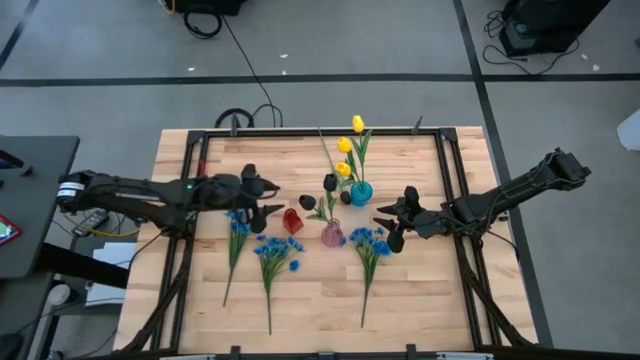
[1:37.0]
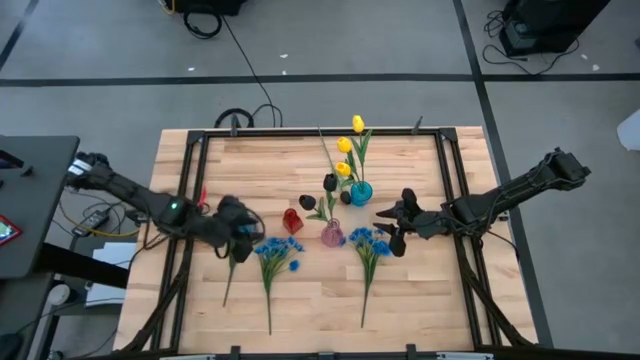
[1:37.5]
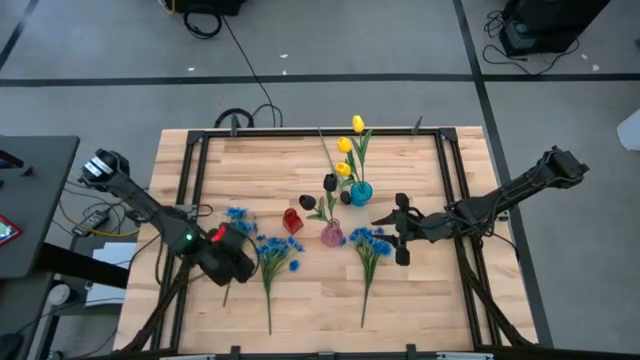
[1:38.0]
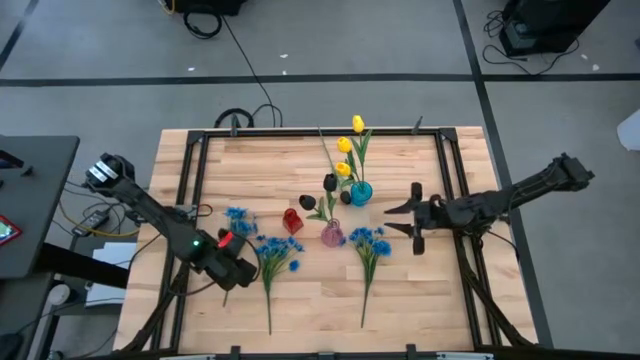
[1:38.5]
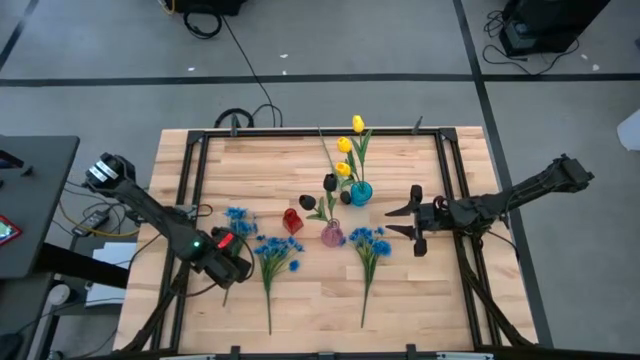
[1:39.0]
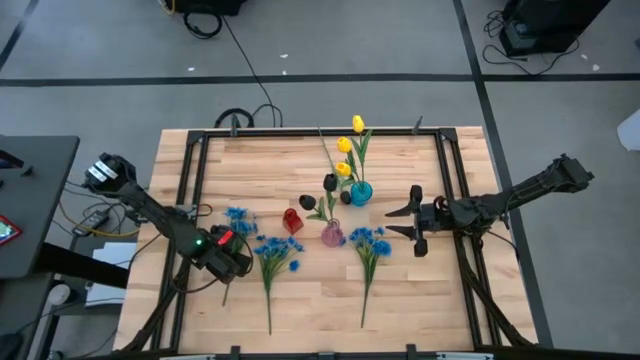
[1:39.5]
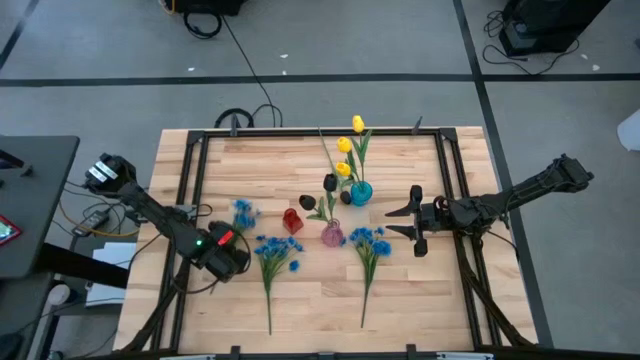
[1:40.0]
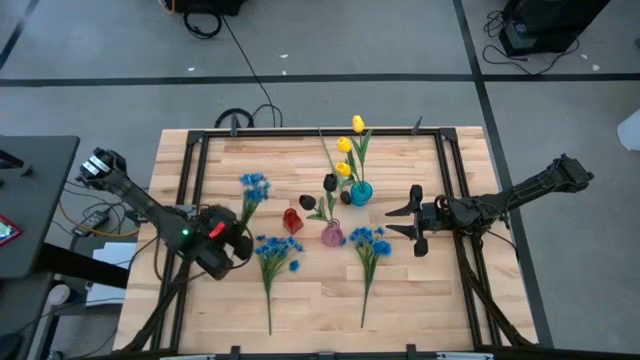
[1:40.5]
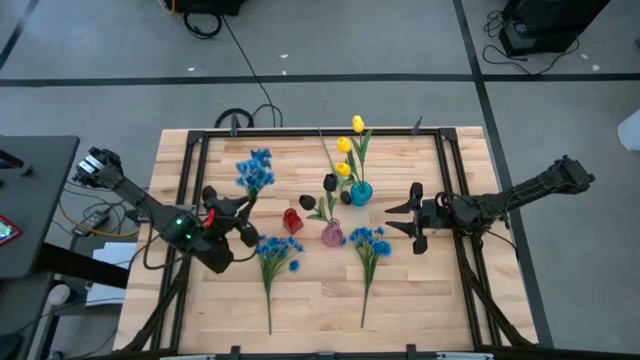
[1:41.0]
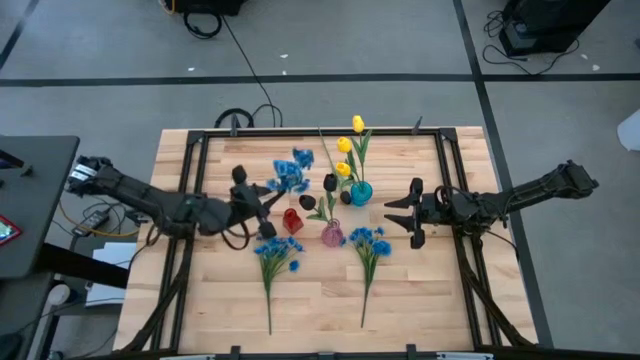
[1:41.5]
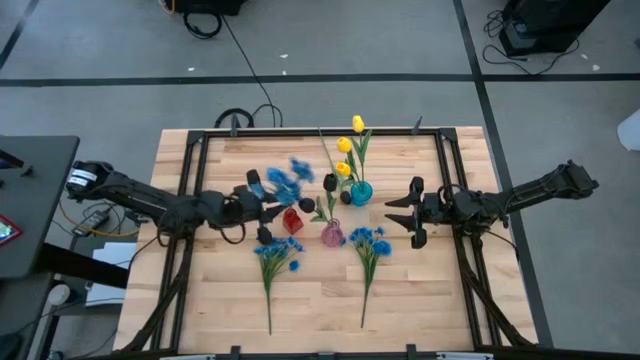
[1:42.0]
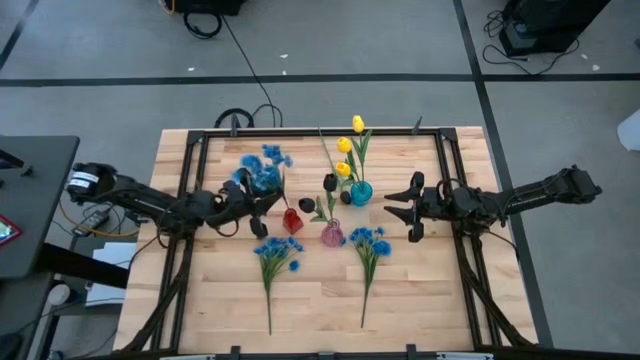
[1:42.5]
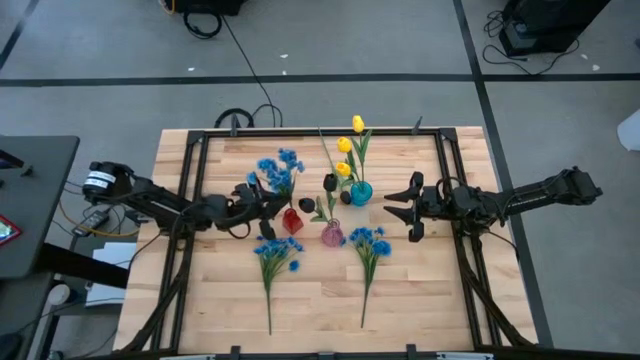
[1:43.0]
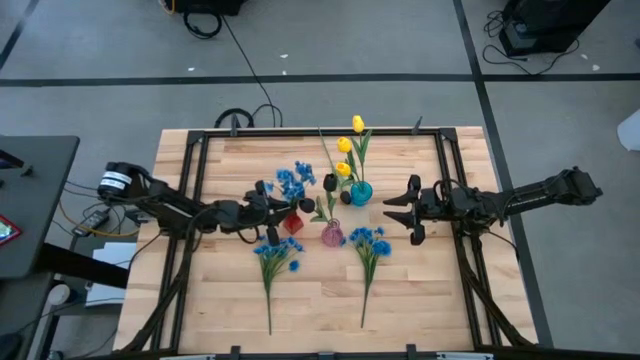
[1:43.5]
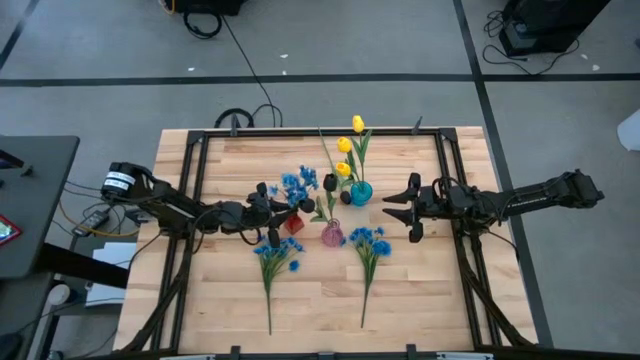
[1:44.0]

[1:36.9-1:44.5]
Task: Sort flowers into vase by color
Put the left blue flower into the red vase

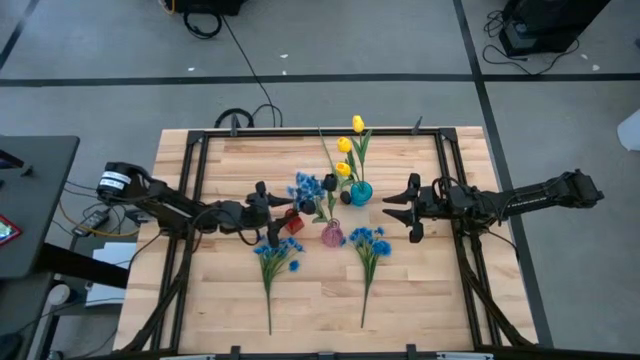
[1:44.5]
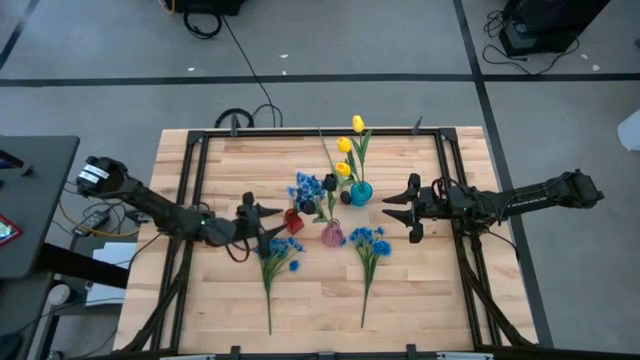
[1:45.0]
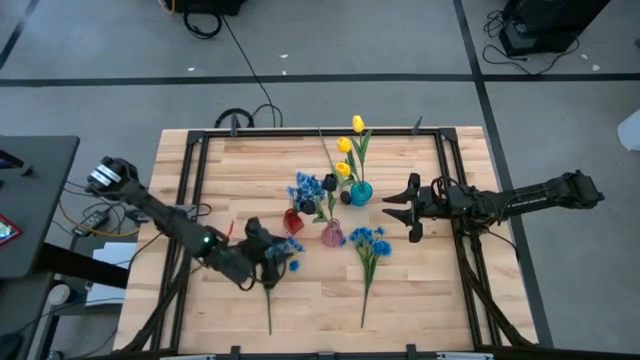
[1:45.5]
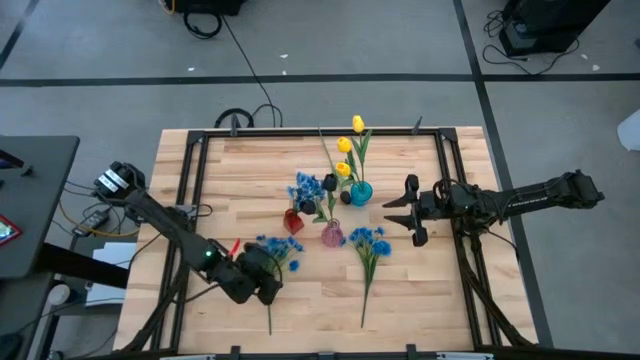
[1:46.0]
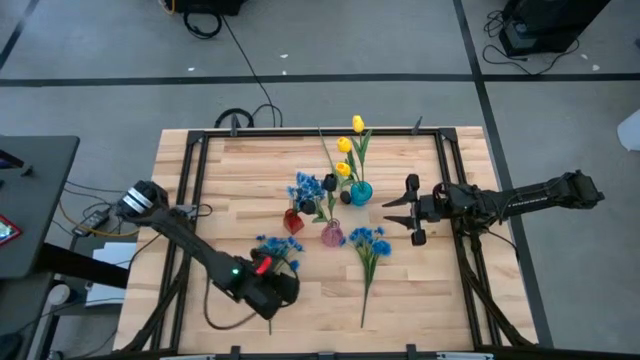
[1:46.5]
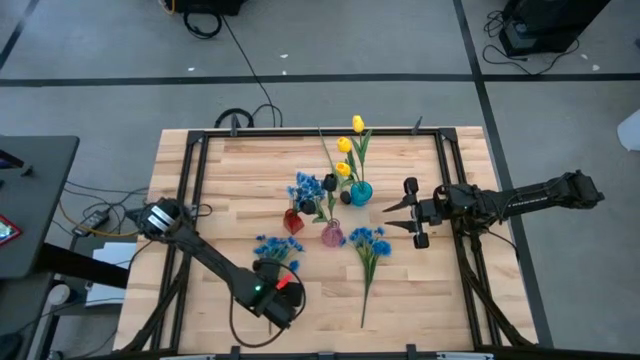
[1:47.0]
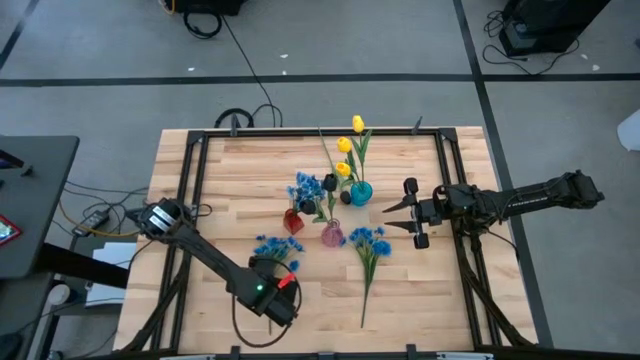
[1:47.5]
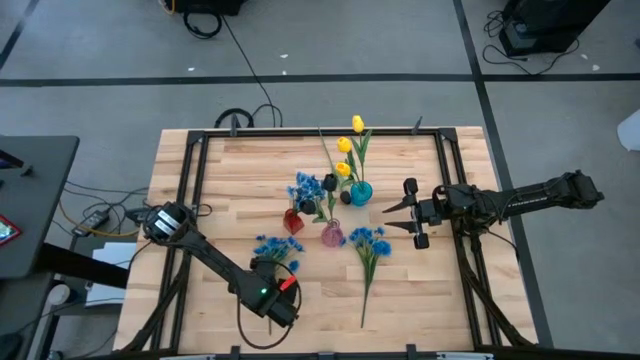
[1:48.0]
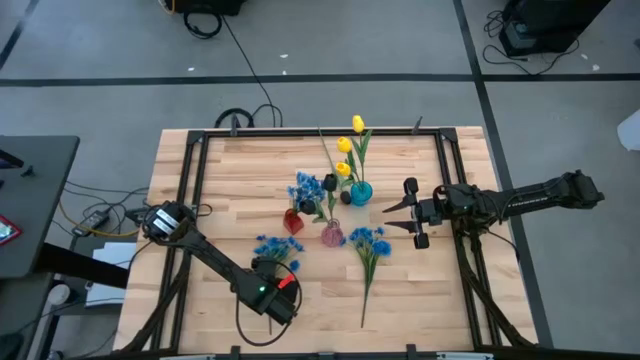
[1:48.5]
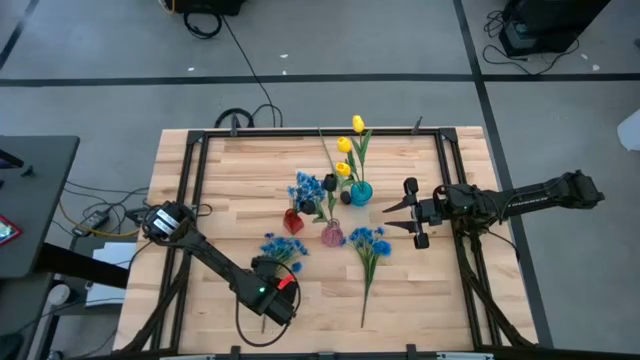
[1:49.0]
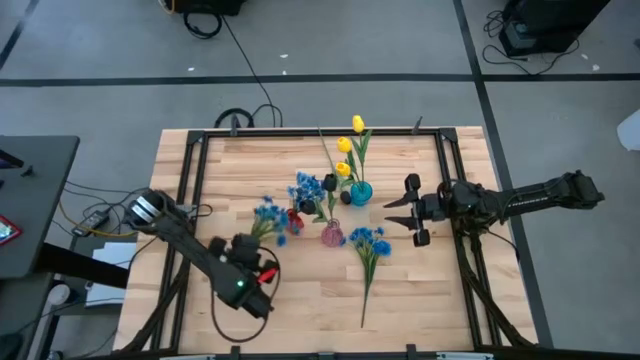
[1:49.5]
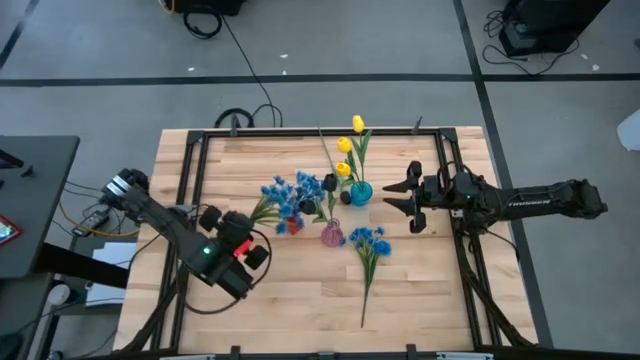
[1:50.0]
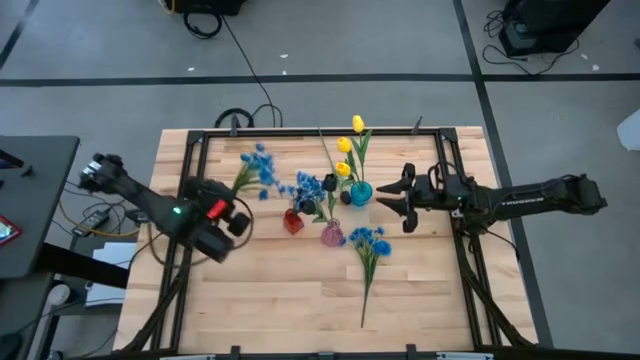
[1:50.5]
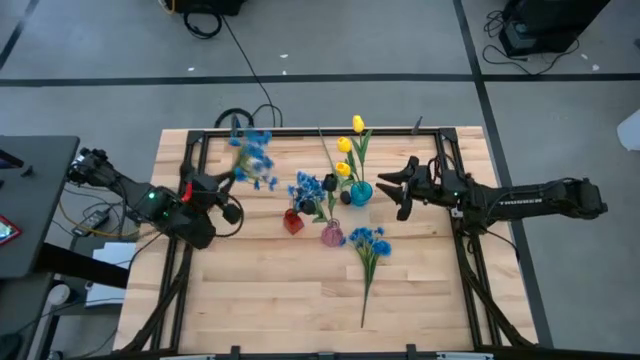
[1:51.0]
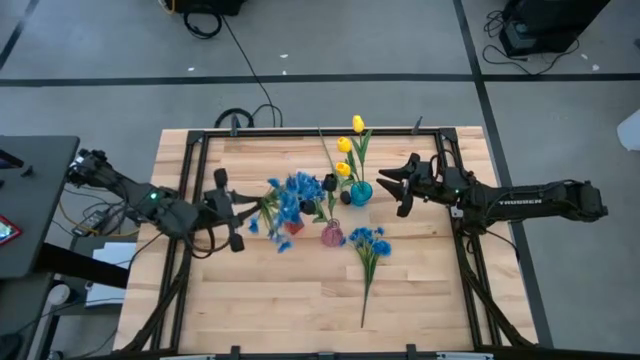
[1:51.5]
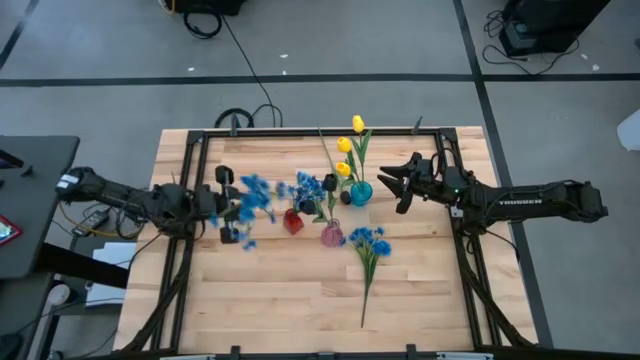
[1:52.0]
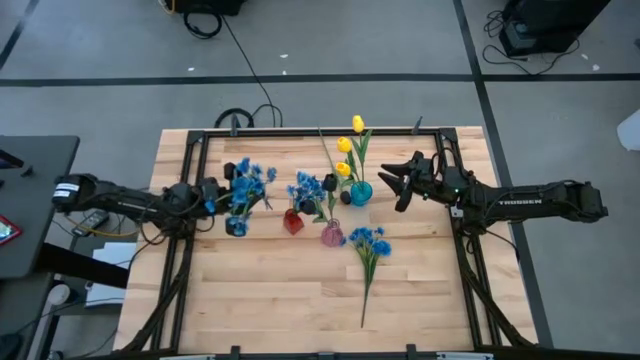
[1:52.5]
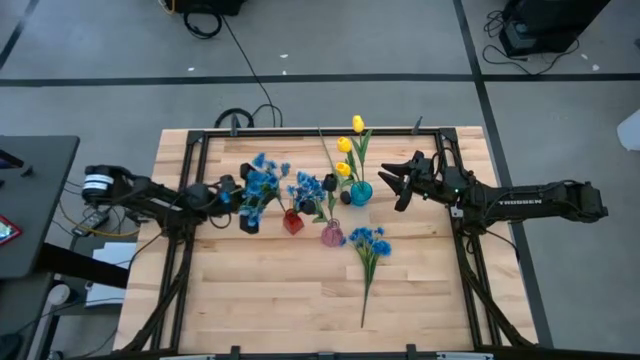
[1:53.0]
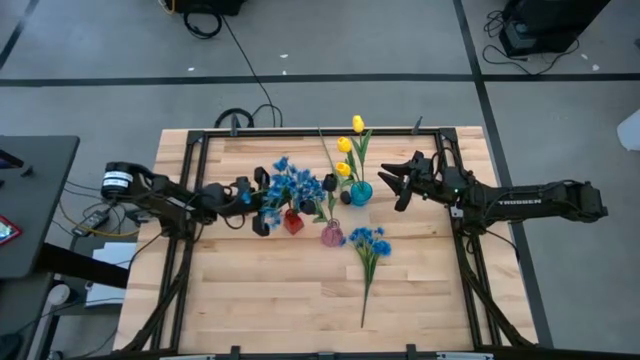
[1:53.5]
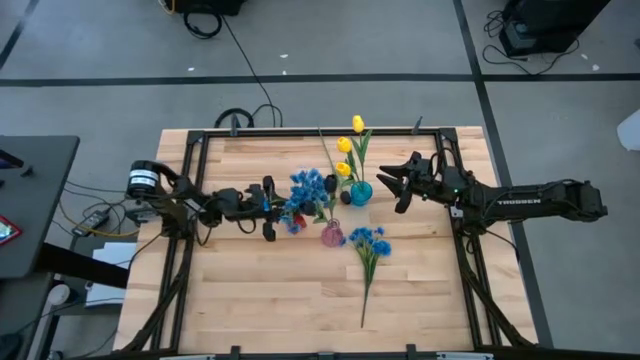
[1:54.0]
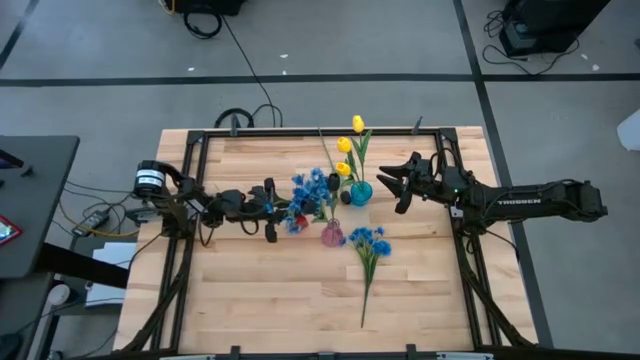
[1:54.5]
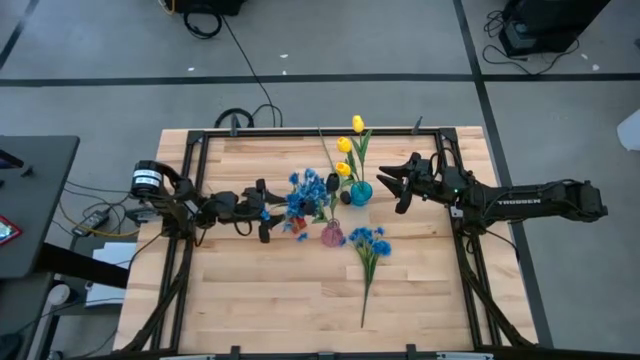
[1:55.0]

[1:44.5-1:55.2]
Put the left blue flower into the red vase
